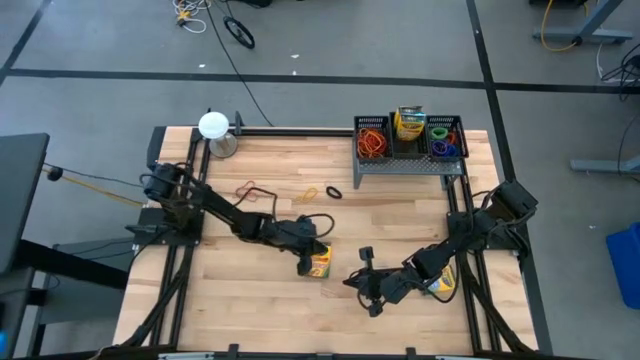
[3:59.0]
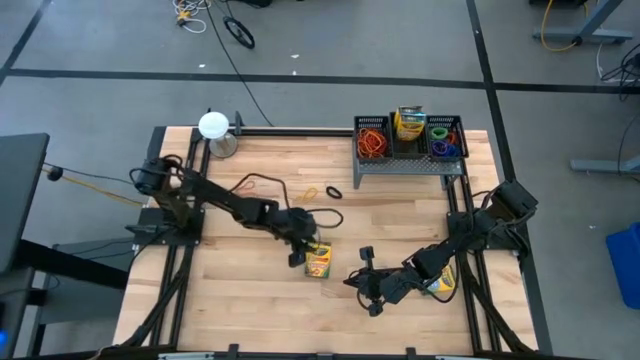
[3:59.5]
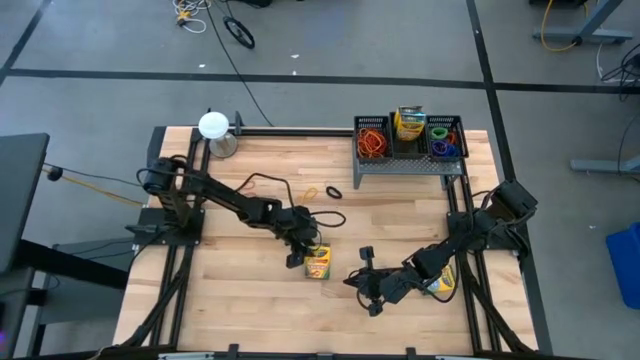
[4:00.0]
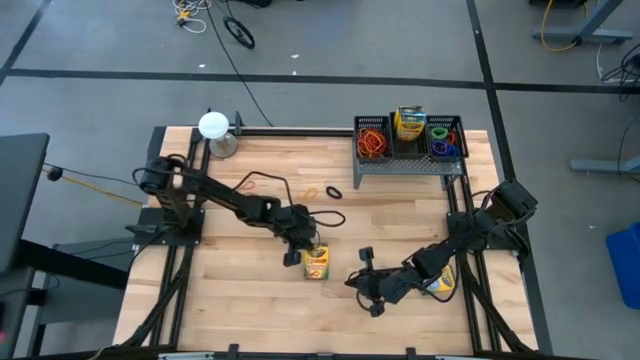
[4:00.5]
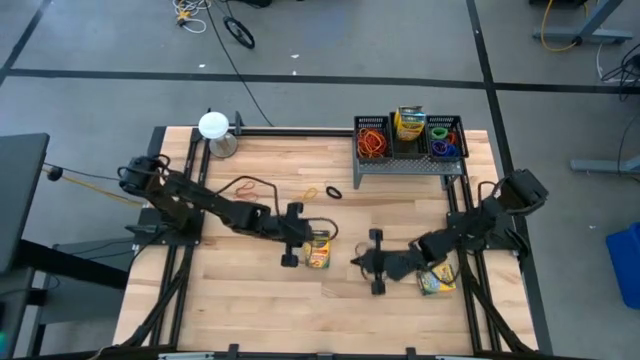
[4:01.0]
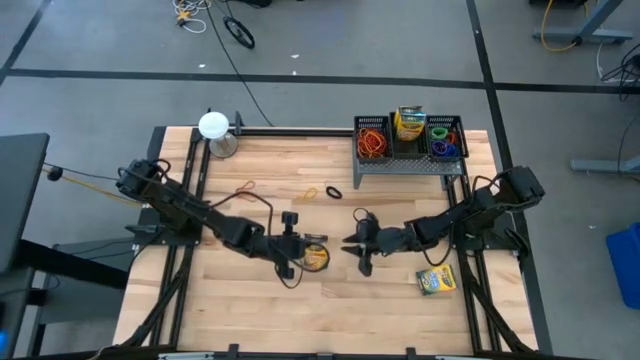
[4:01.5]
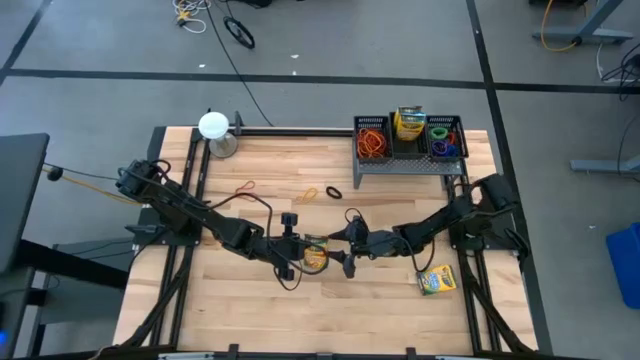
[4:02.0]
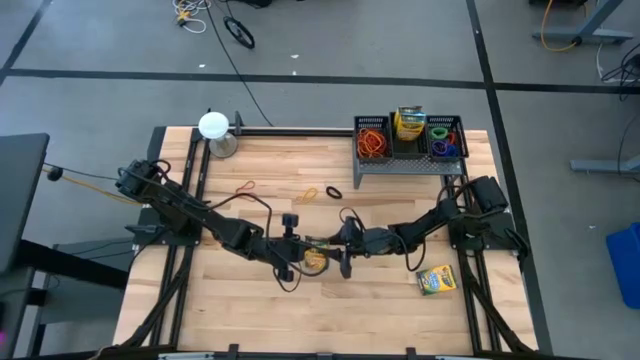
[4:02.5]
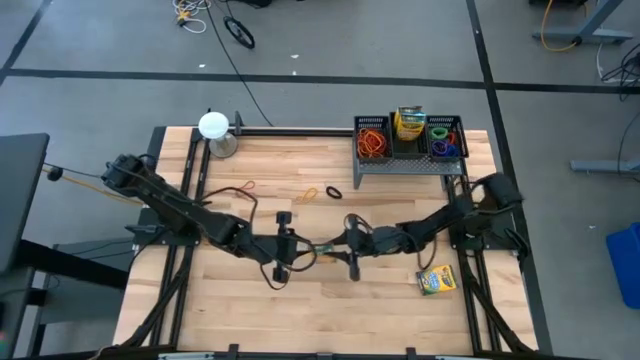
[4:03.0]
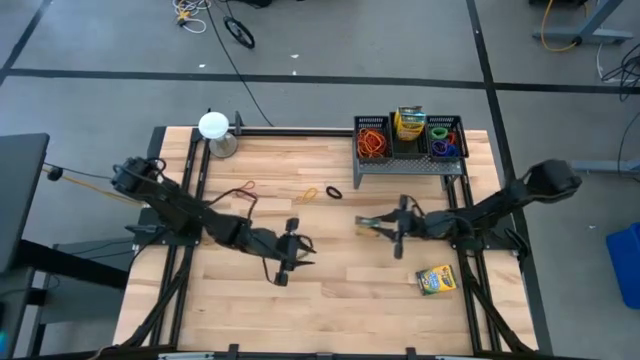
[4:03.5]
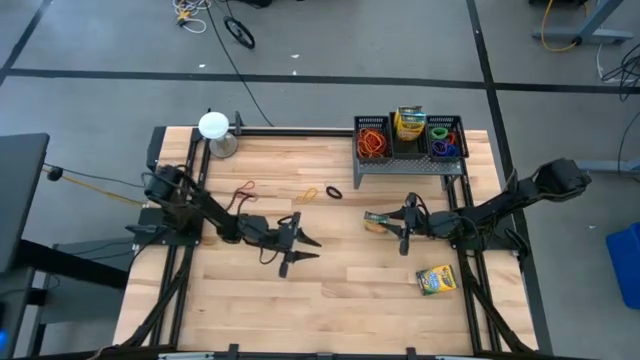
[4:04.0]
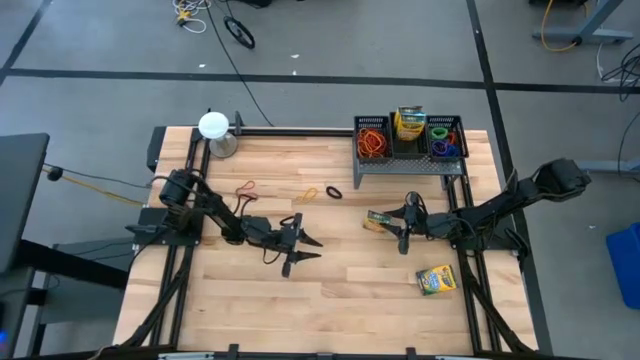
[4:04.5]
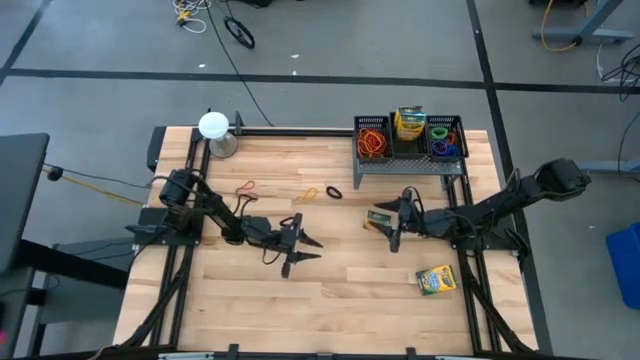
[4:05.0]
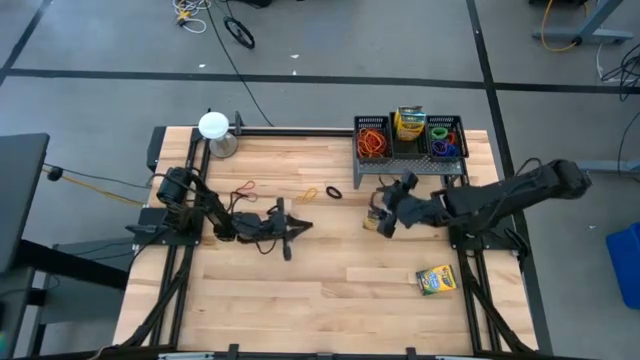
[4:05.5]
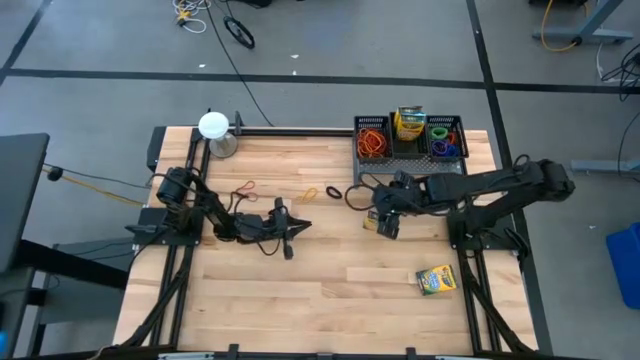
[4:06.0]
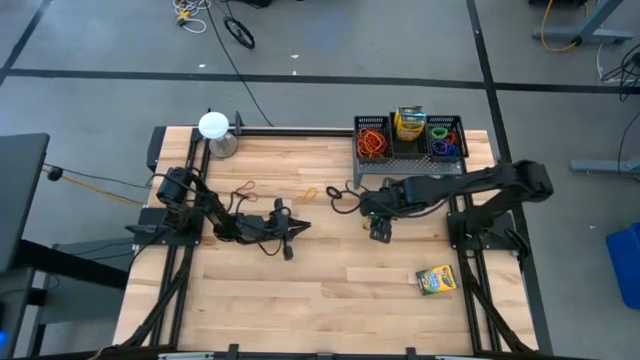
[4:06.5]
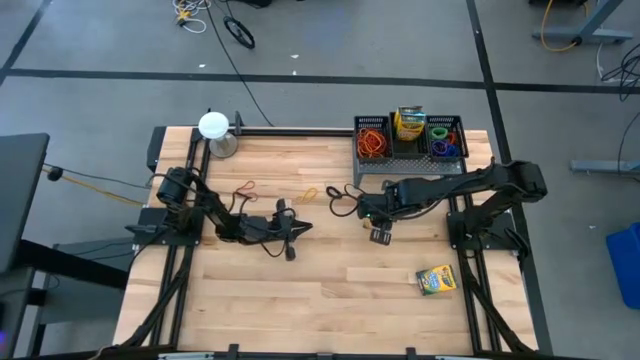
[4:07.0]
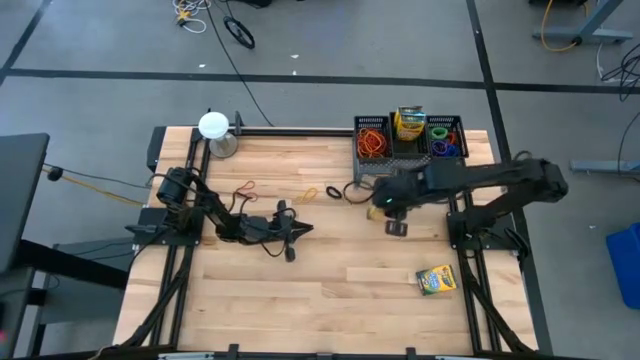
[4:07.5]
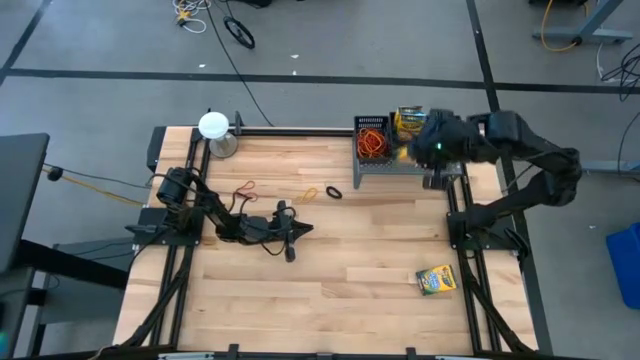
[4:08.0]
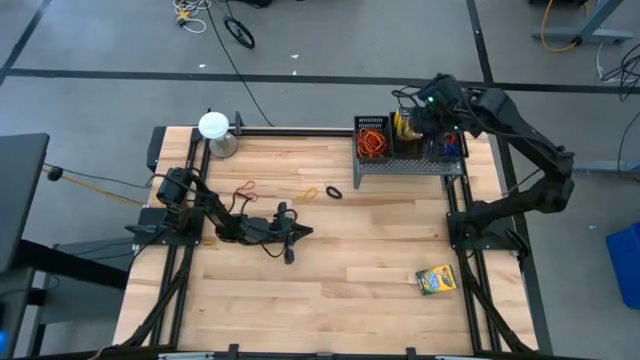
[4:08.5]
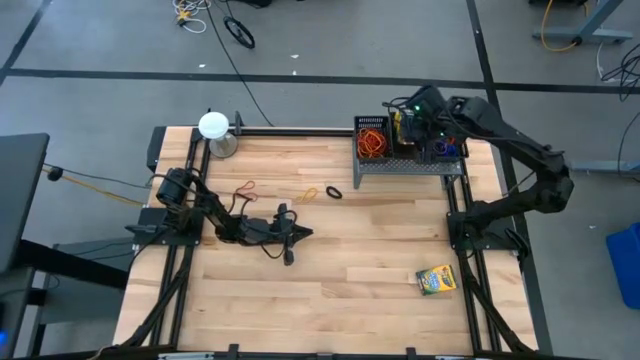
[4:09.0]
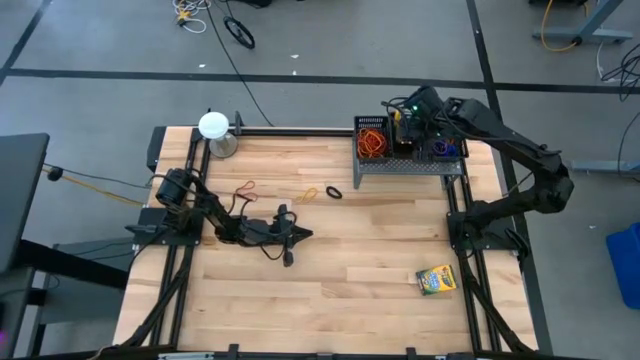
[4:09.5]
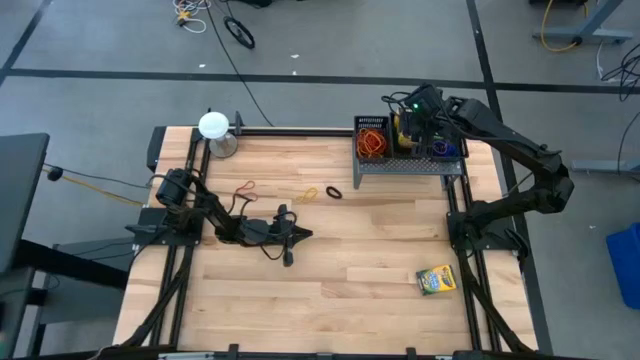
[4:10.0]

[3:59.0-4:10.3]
Task: Pick & Place Office Desk Supplies
Put the yellow crayon box into the middle black bin on the shelf

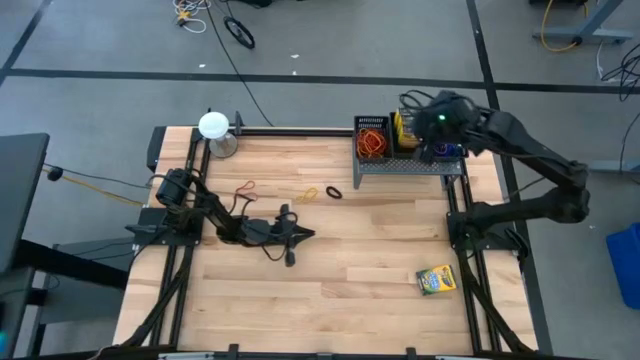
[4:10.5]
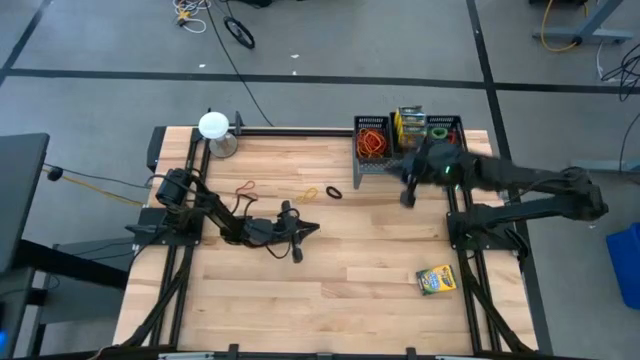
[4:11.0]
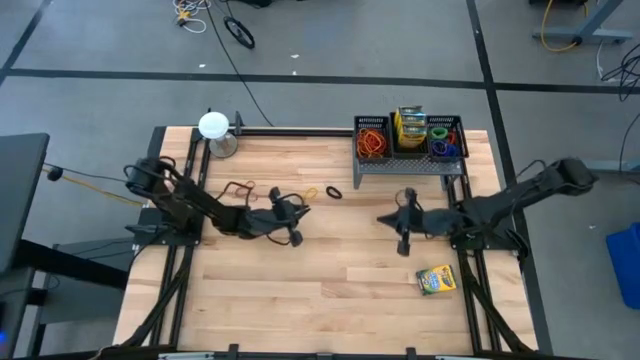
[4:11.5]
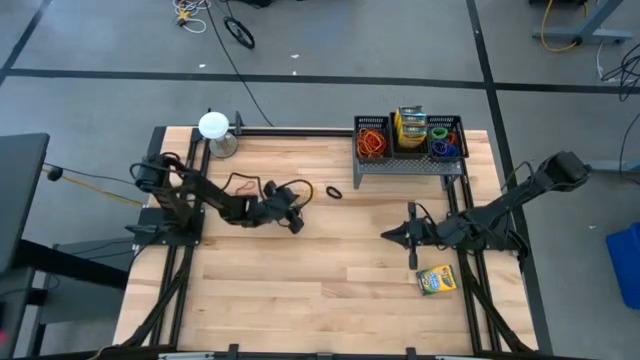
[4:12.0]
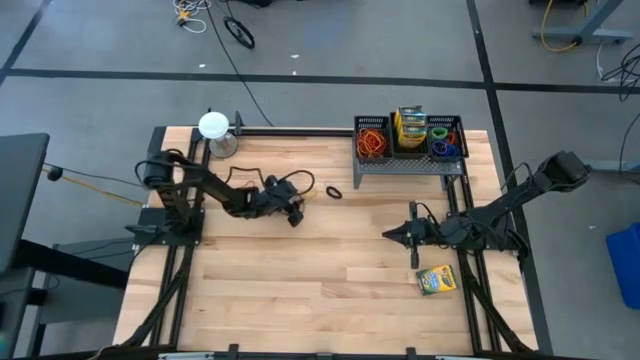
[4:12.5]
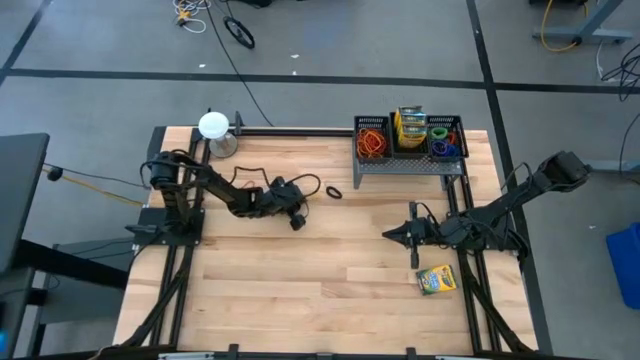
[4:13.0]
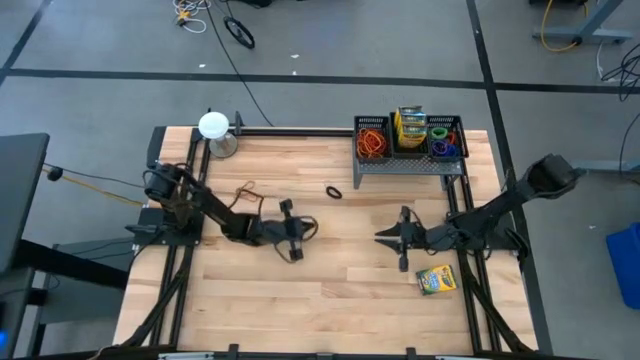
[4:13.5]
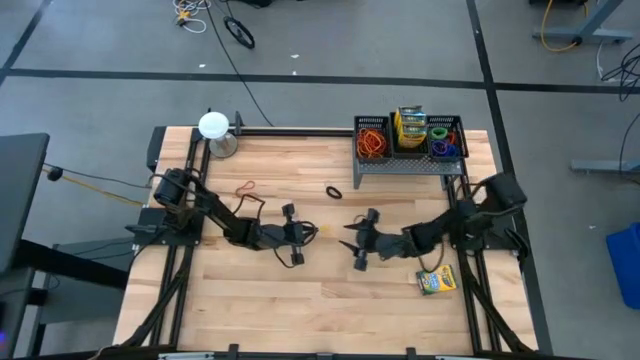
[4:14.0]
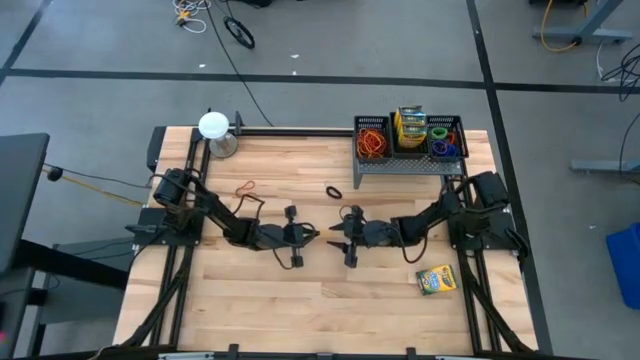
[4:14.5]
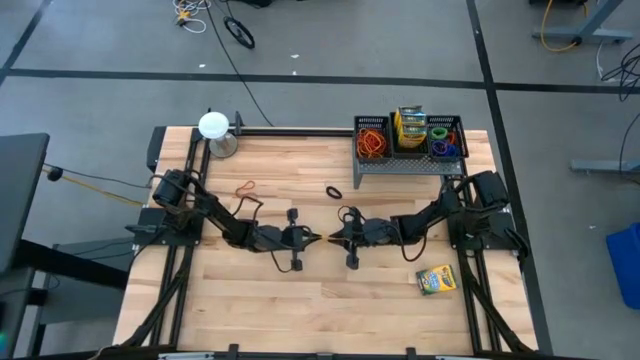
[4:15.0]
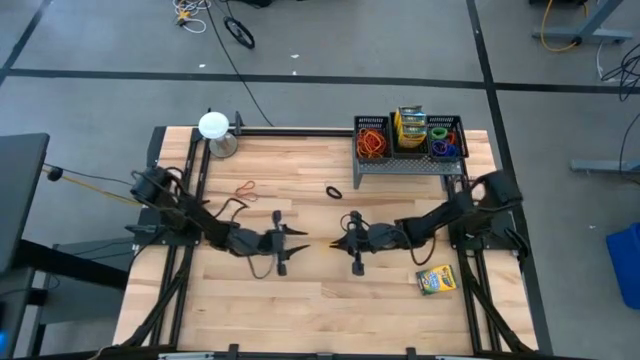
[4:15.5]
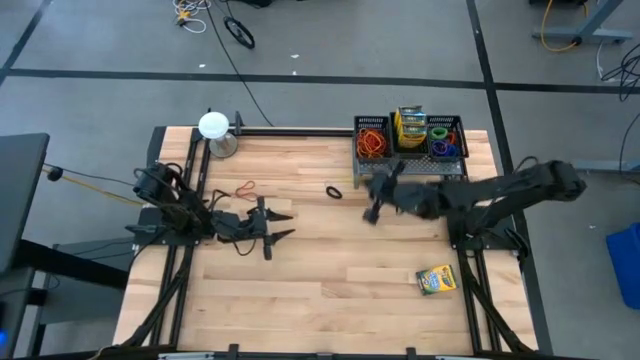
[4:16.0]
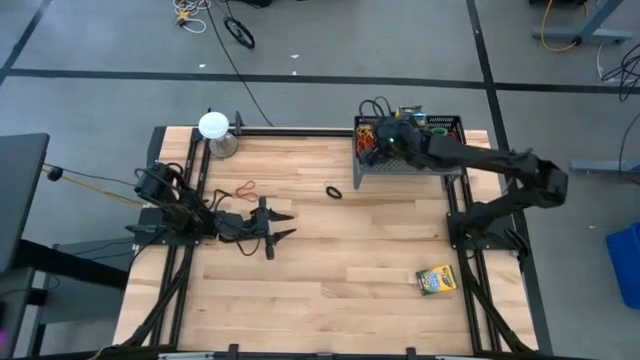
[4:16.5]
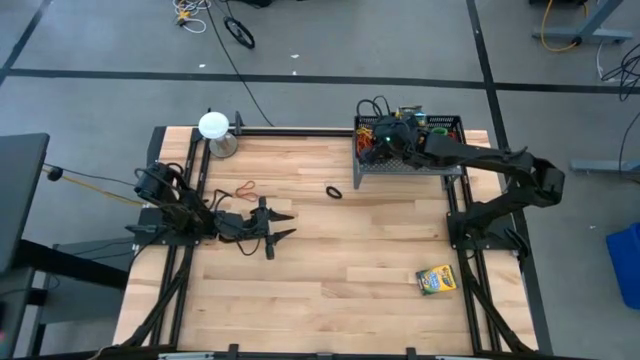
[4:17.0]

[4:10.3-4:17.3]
Put the yellow rubber band into the left black bin on the shelf

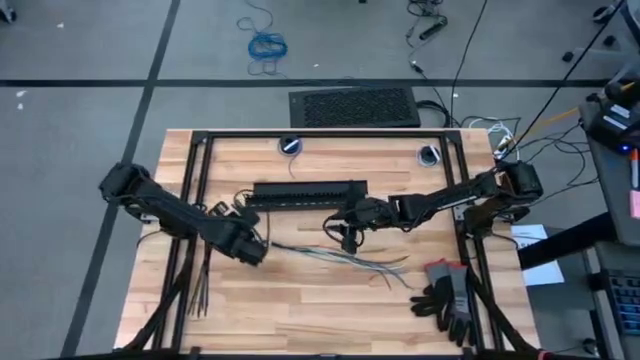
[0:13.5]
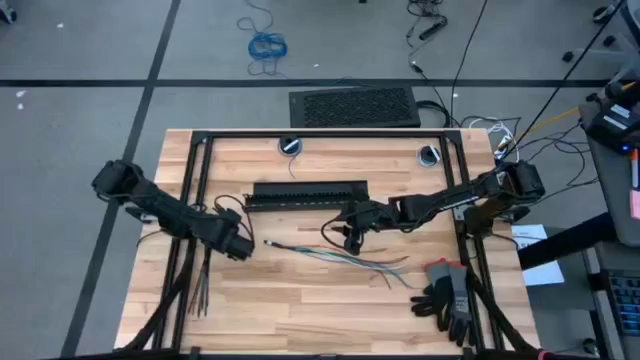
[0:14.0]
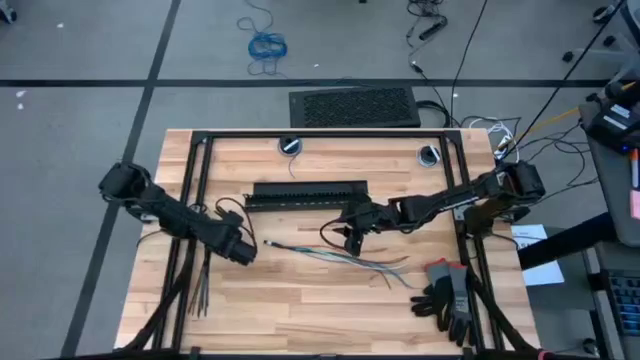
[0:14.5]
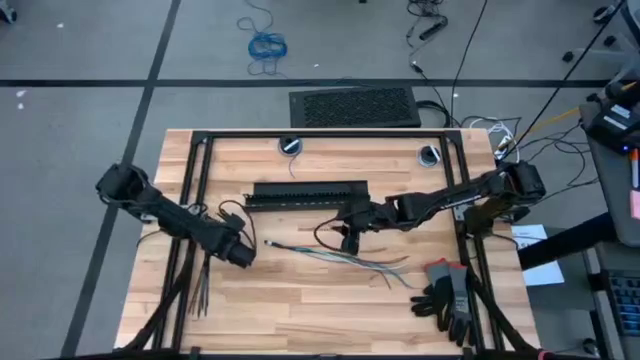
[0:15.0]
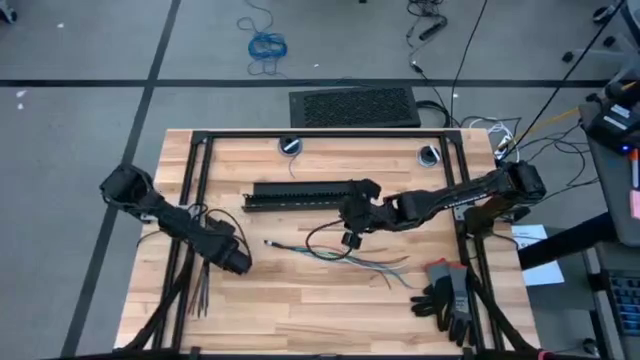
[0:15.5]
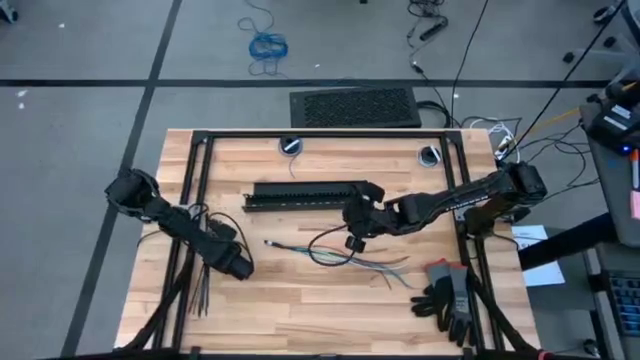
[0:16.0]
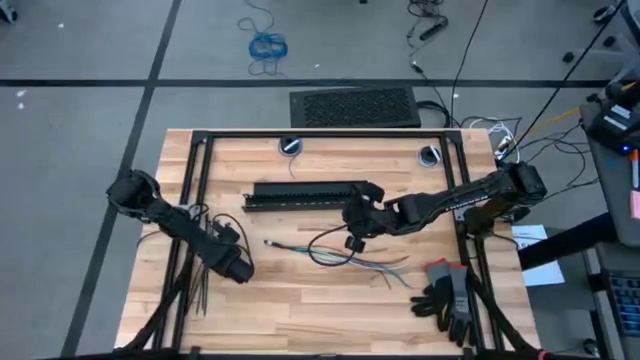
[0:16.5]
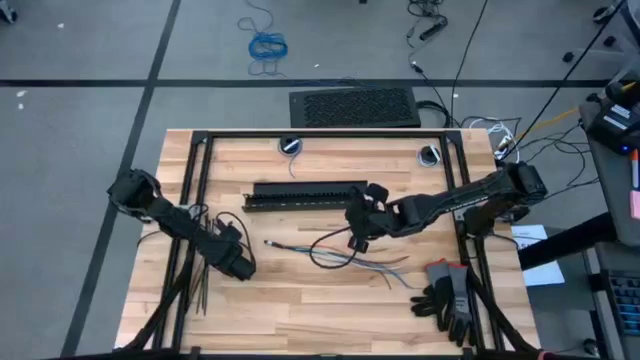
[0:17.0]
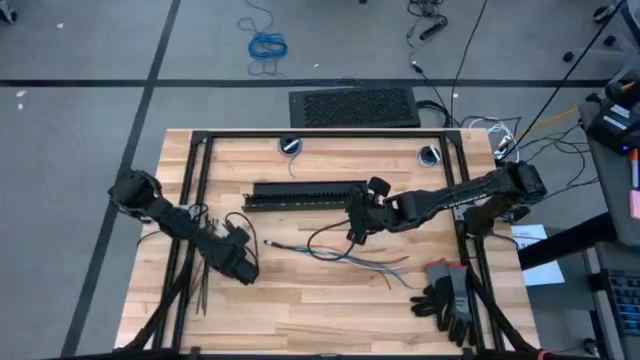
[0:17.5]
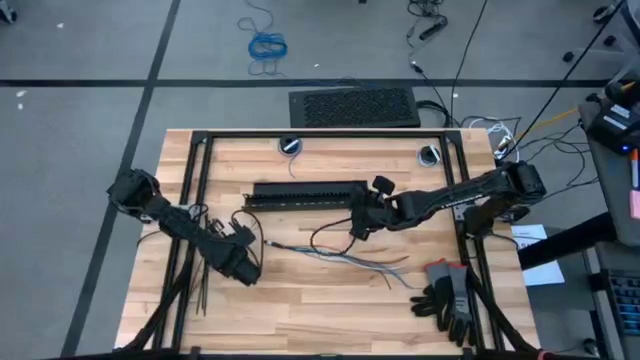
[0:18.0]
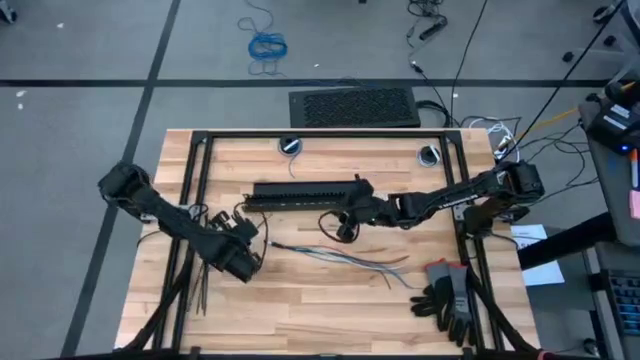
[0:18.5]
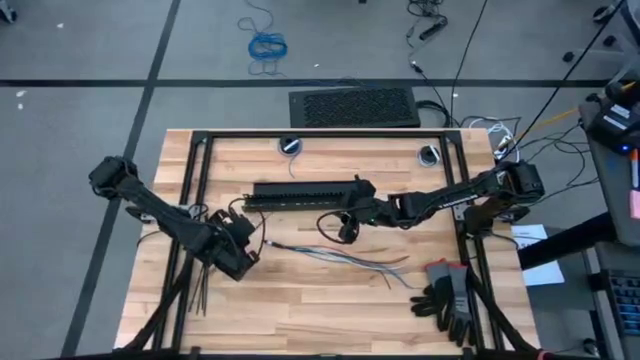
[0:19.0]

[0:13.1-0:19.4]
Task: Ziptie cables
Wrap the cable wires with zip tie
